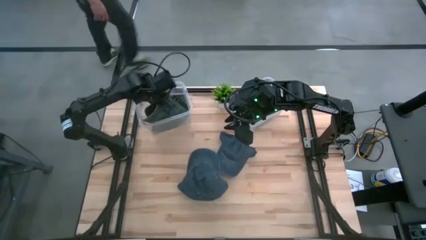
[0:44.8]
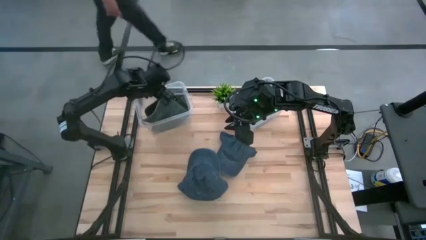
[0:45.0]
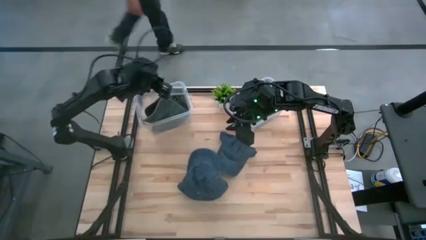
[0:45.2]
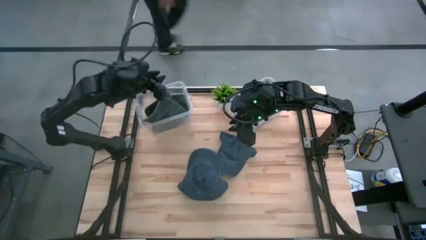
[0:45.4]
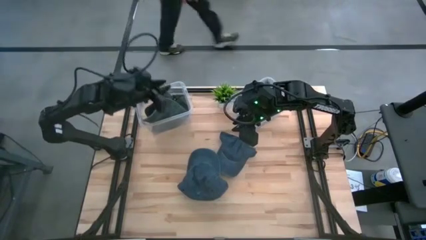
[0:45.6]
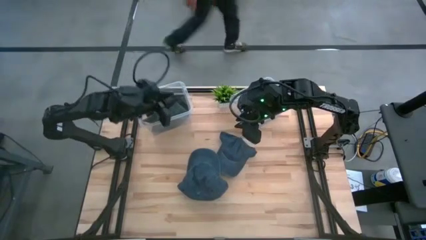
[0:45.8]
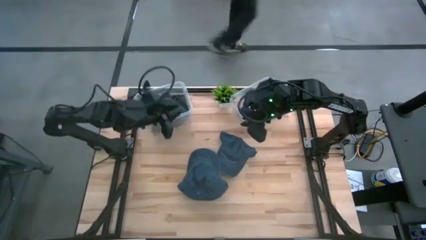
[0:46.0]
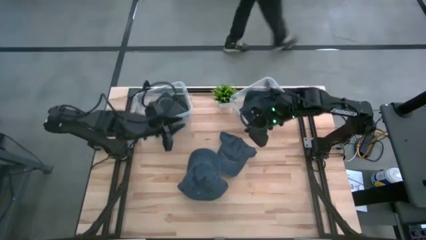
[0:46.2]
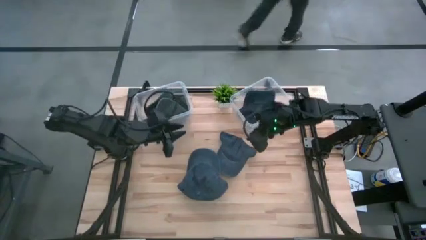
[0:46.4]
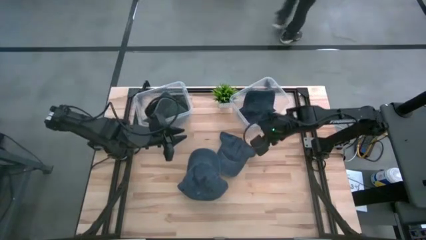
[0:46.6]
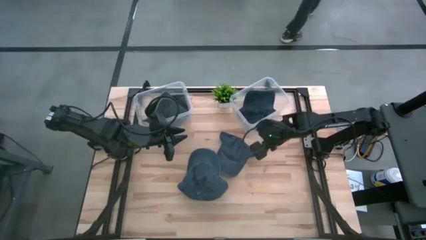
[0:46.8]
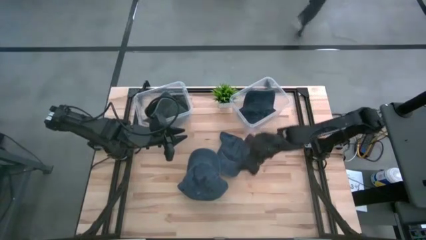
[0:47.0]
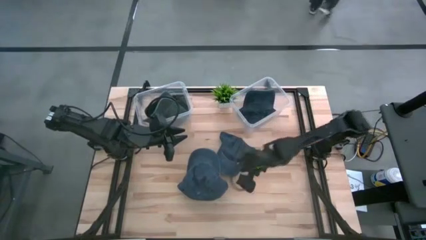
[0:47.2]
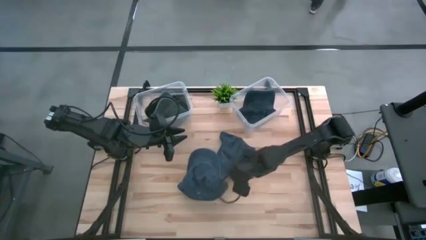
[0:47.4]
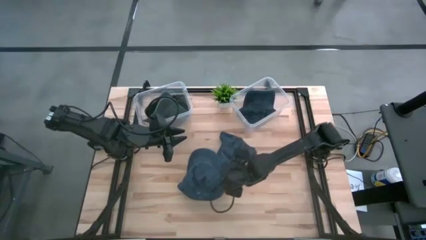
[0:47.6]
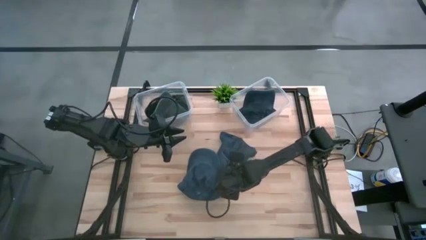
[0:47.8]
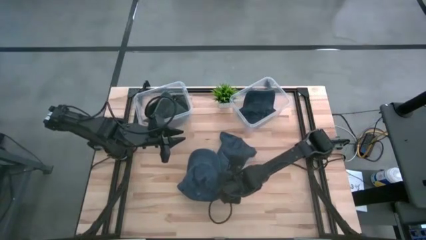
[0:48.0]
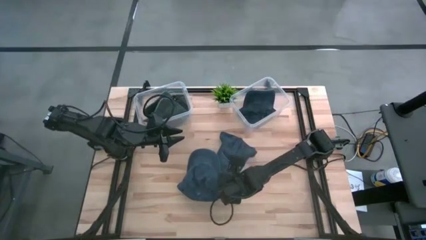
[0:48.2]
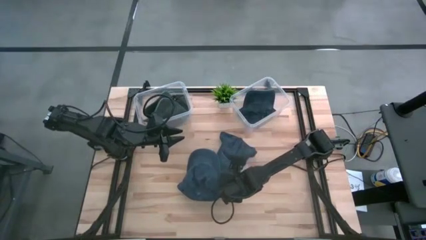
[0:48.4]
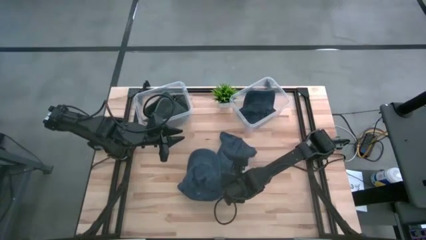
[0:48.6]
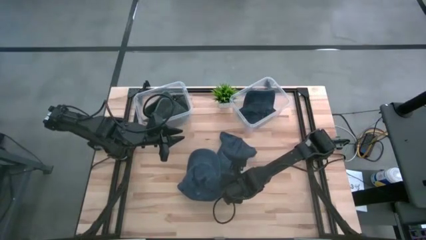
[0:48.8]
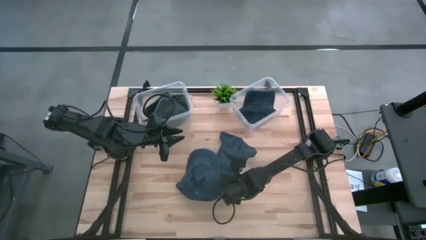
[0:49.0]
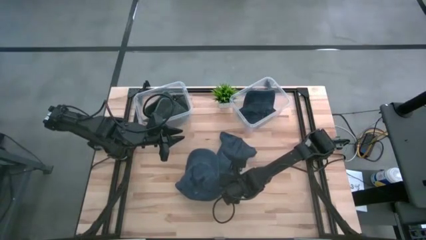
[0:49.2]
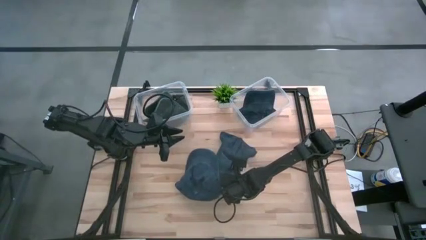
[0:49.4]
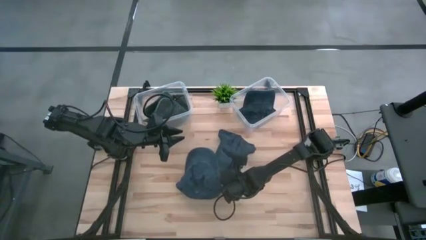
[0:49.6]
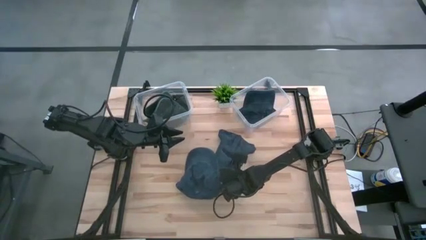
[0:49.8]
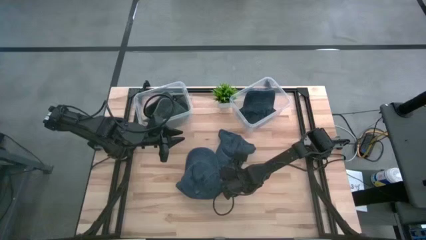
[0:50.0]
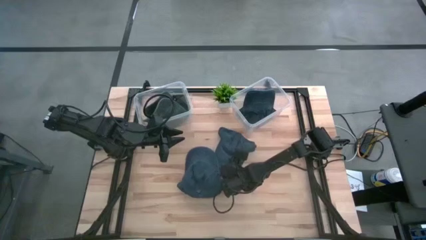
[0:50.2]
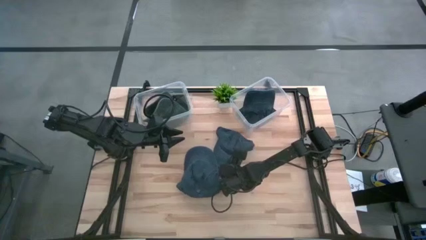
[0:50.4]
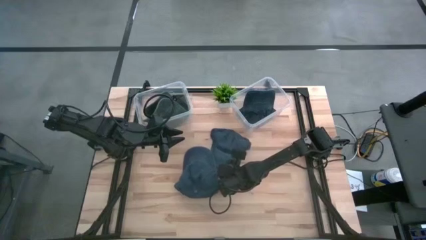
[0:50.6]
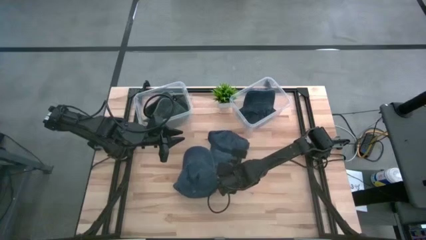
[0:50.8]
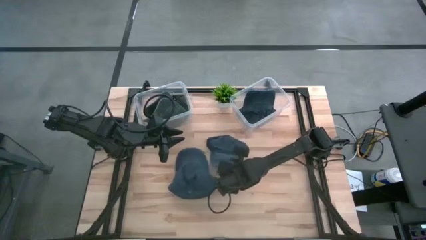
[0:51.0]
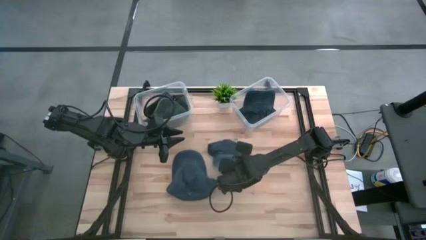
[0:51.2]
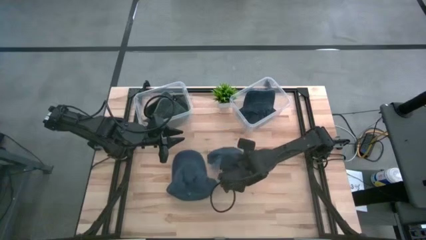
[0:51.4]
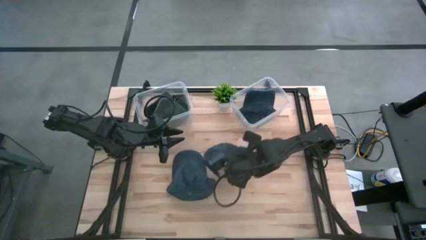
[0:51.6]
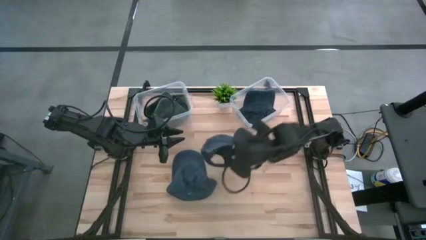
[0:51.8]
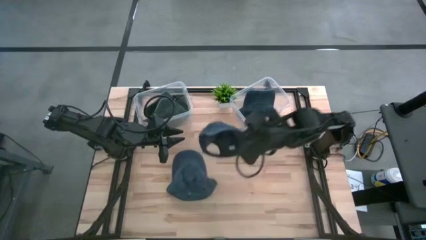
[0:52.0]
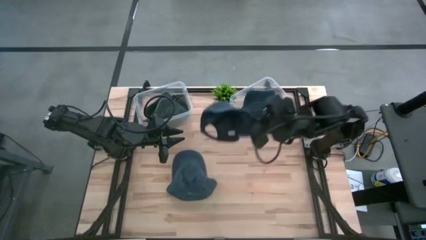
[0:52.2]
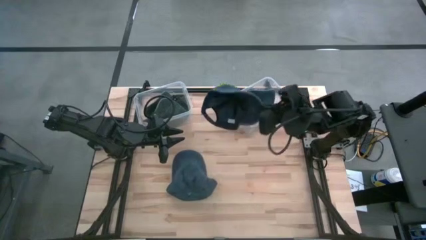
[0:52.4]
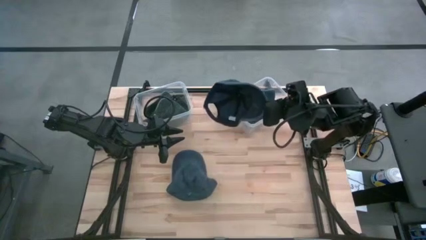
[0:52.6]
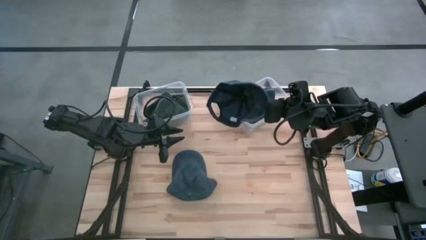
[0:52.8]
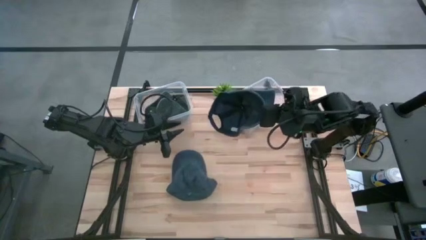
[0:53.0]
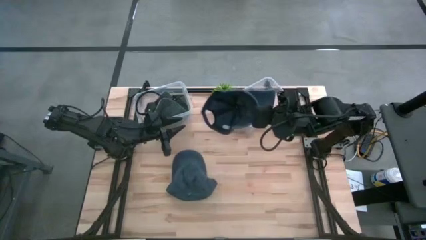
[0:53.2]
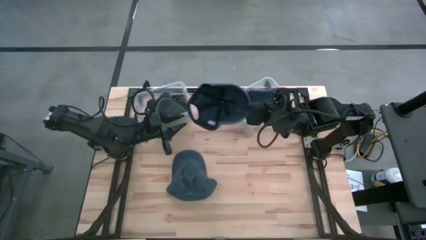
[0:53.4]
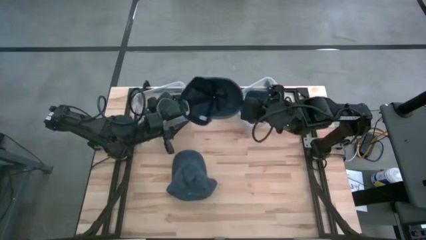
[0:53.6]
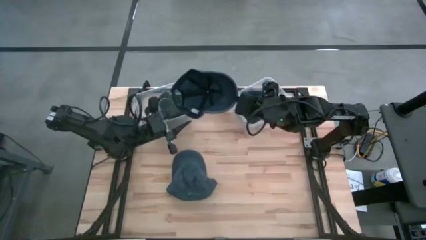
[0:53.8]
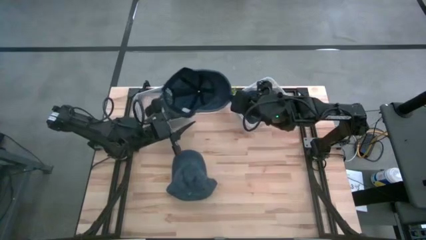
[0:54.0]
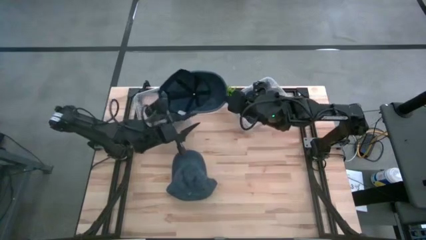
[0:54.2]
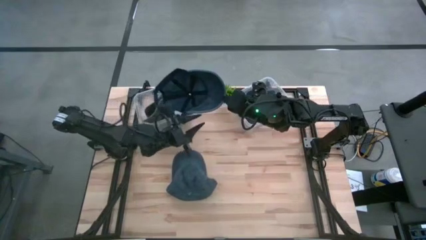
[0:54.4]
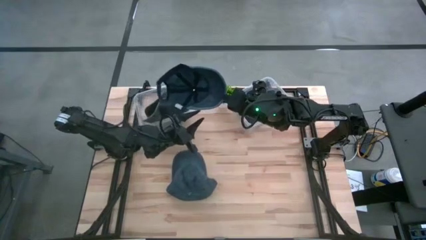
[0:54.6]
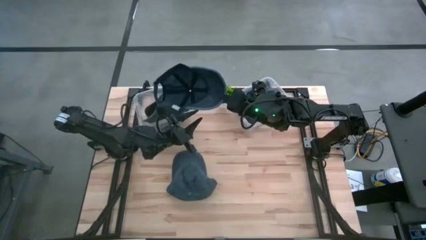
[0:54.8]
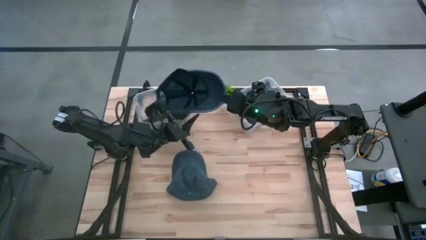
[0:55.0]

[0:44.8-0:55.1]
Task: Pick & Place hat
Put the right blue cap into the right transparent bin

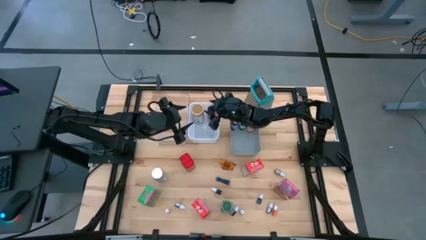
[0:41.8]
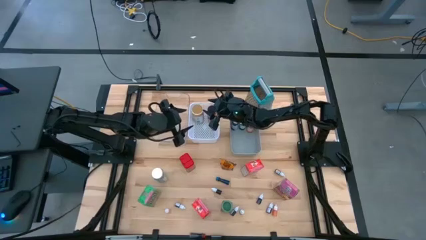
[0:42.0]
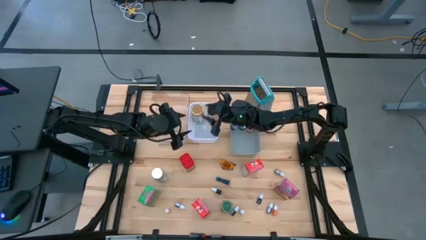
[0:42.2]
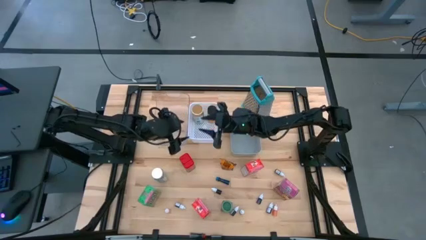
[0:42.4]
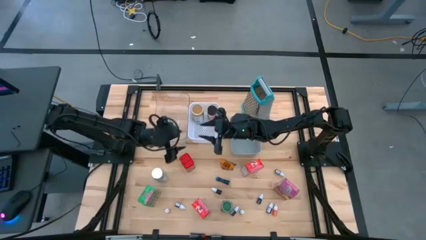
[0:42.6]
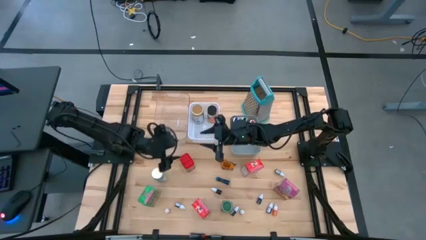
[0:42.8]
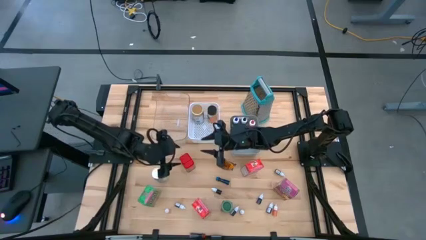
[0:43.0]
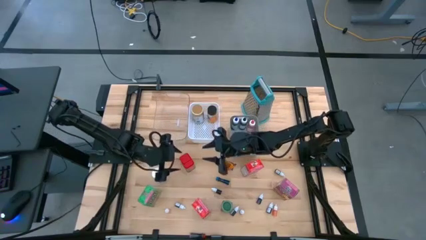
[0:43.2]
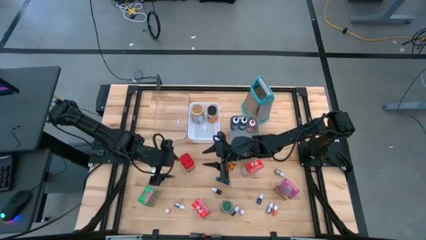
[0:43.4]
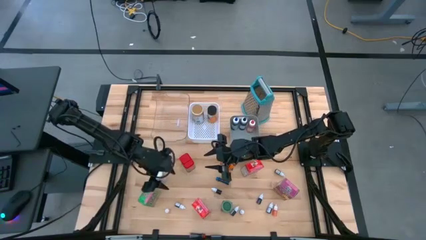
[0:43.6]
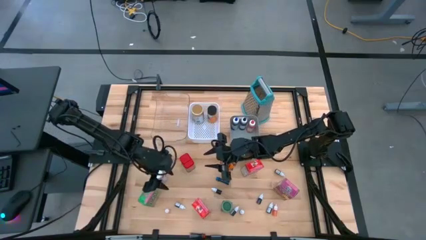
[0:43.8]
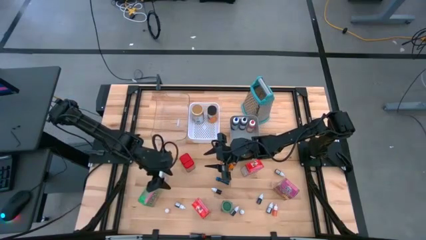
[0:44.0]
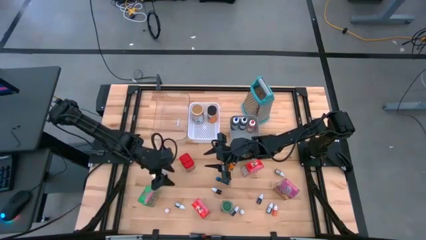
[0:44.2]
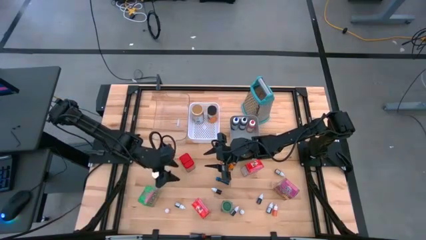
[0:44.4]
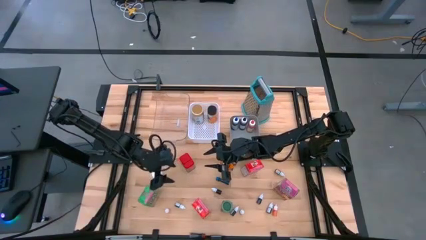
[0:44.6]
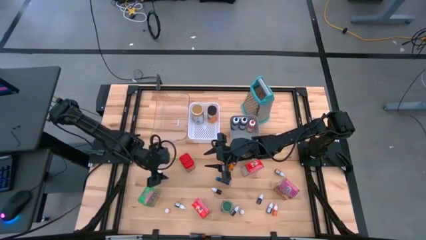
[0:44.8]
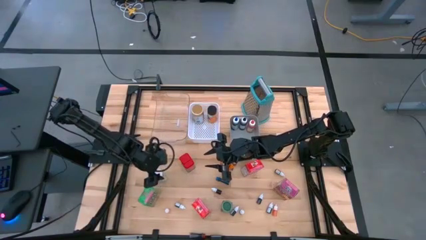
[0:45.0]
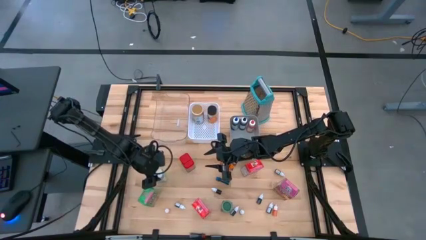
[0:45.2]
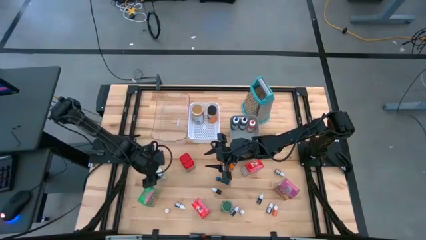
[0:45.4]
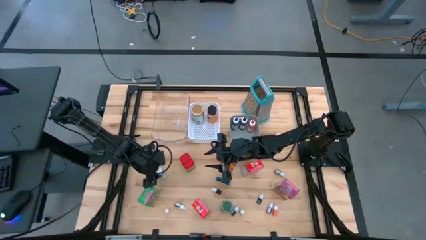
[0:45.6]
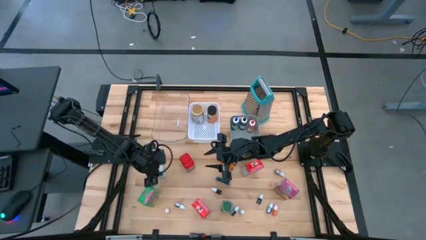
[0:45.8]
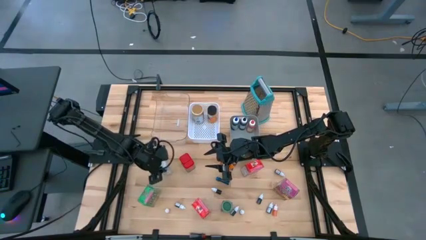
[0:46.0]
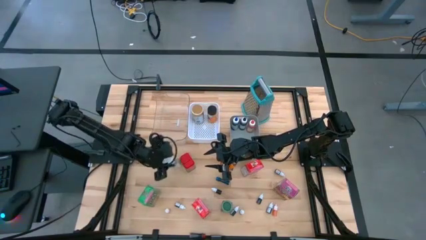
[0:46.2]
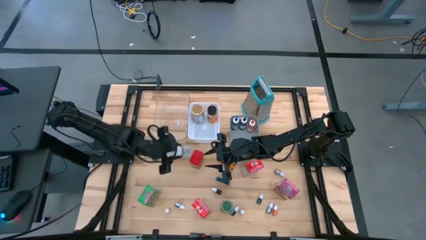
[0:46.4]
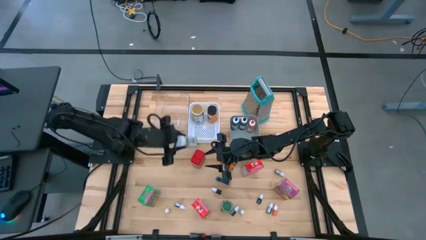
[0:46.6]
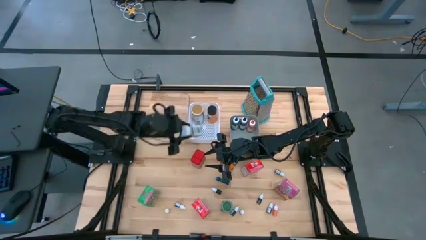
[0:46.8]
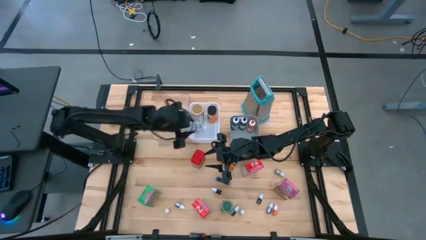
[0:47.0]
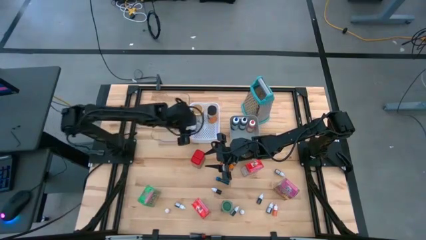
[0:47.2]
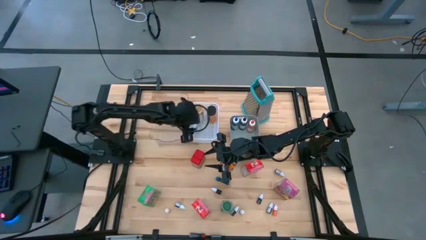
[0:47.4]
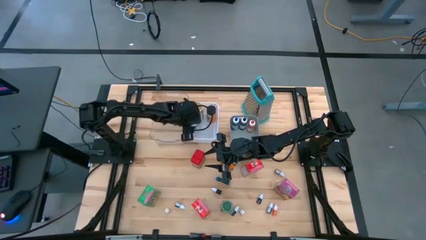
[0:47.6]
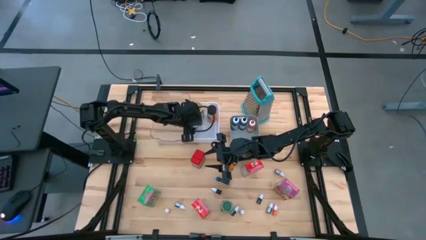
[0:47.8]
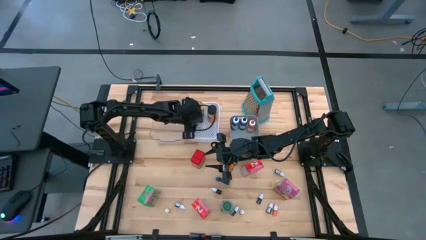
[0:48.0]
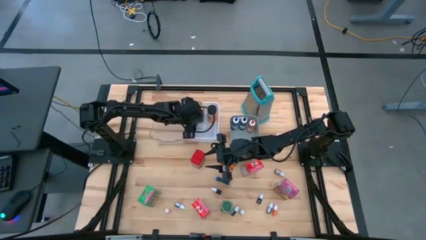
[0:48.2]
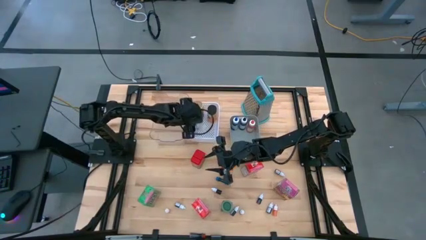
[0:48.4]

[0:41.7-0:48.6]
Task: Pick & Place Kitchen Items
Put the white spice bottle into the white basket
